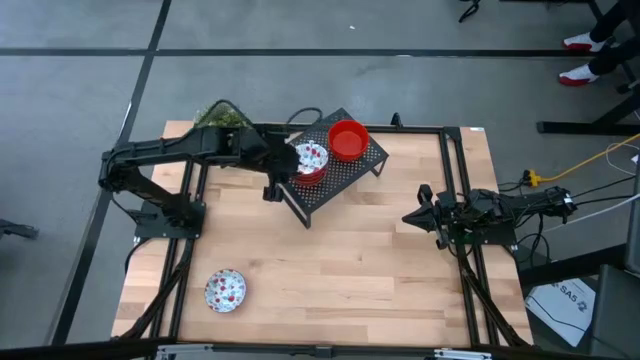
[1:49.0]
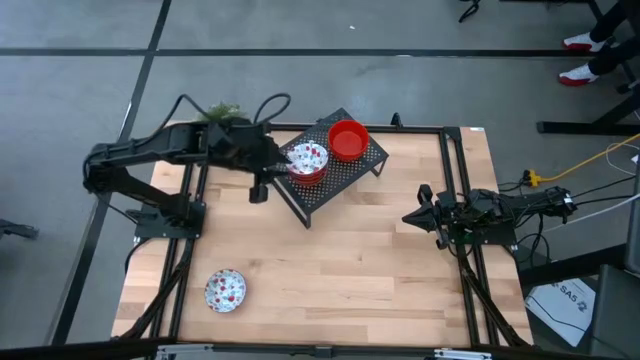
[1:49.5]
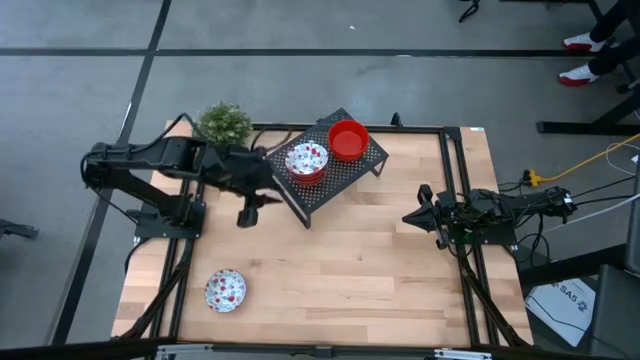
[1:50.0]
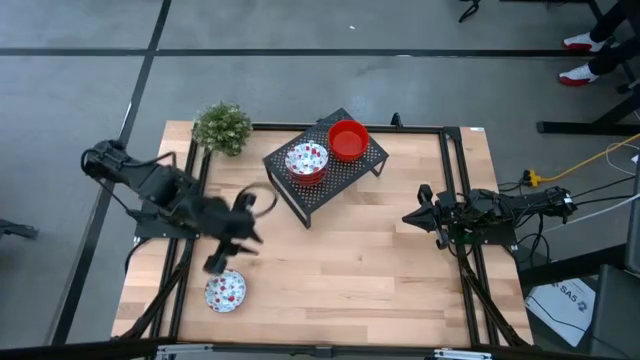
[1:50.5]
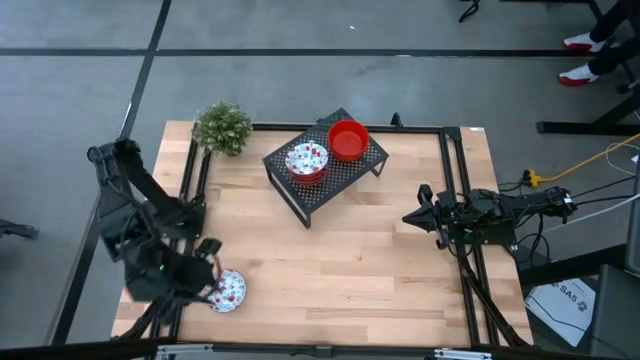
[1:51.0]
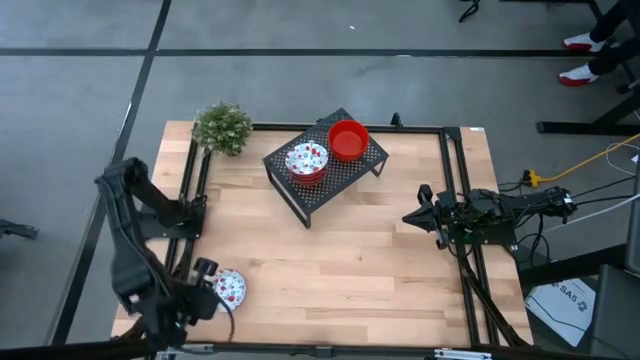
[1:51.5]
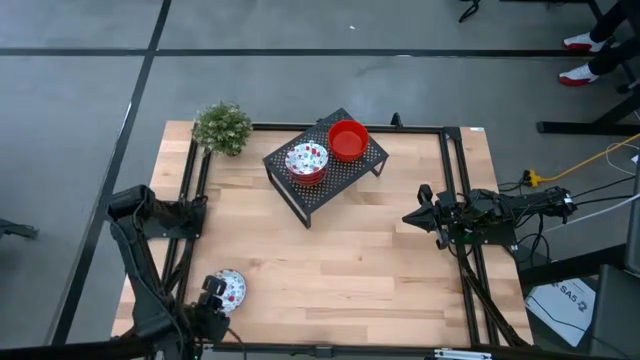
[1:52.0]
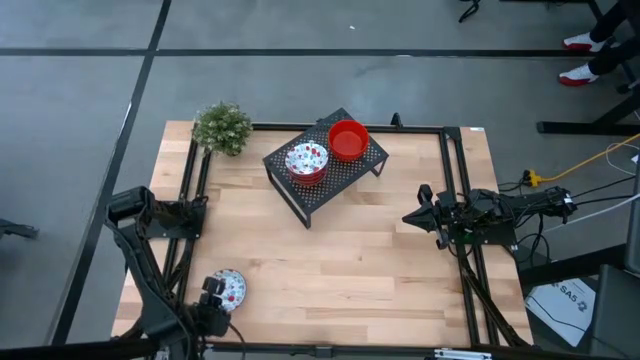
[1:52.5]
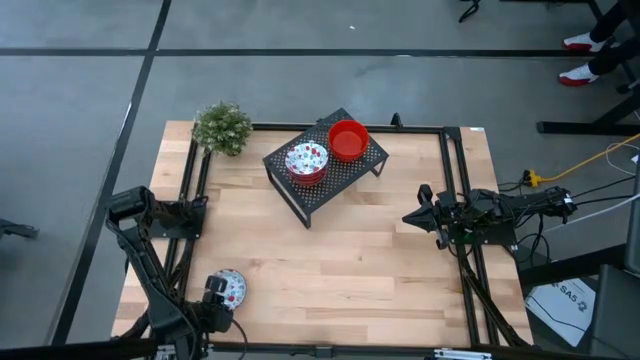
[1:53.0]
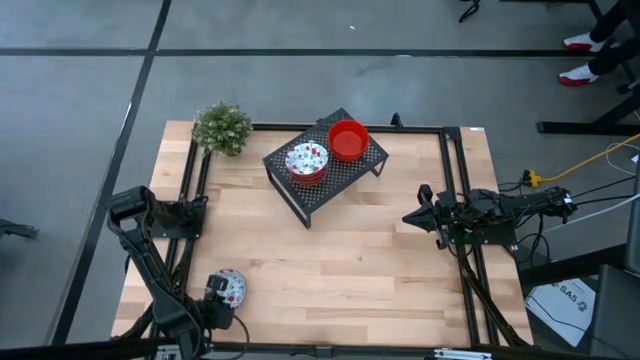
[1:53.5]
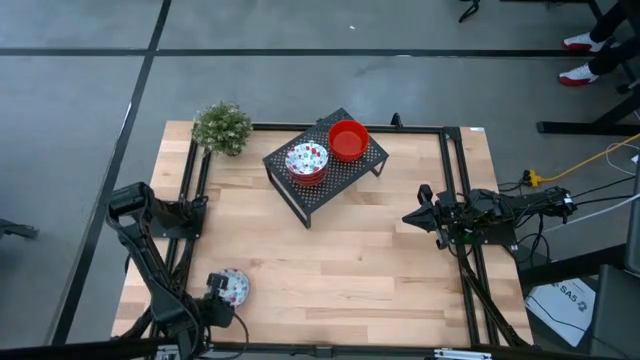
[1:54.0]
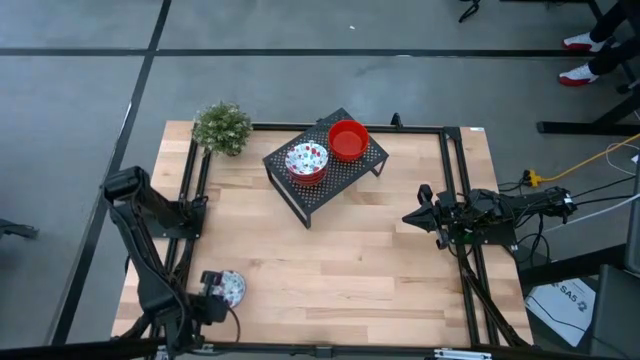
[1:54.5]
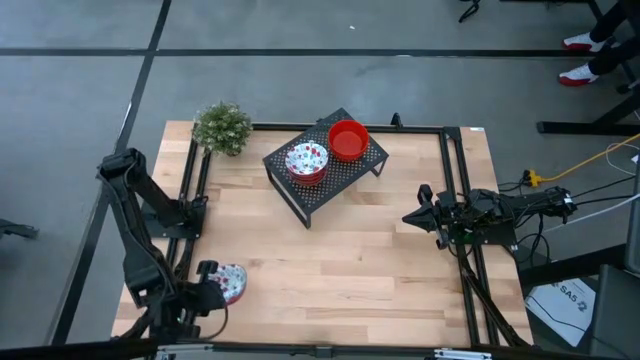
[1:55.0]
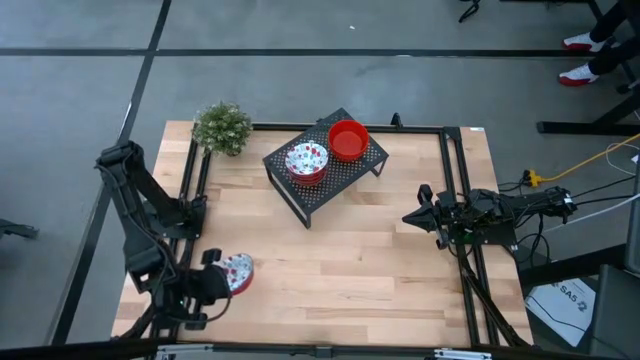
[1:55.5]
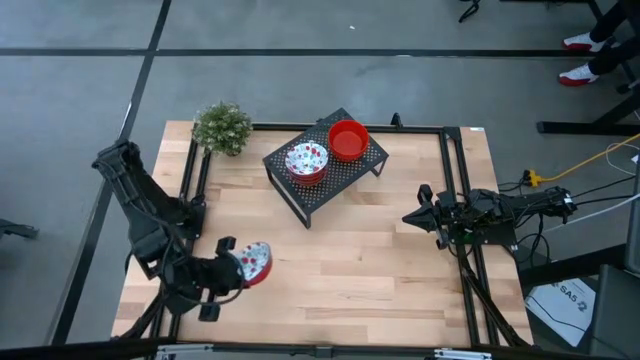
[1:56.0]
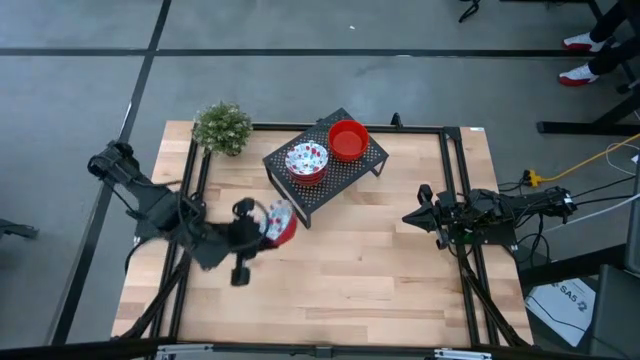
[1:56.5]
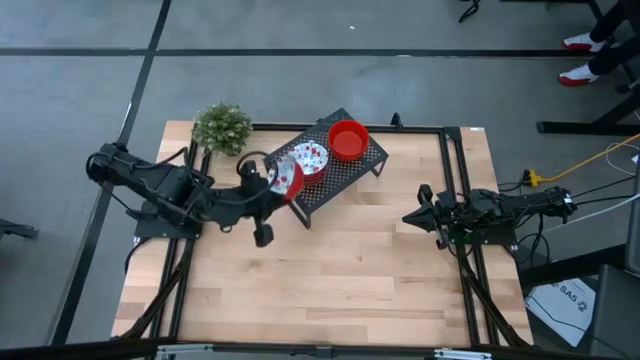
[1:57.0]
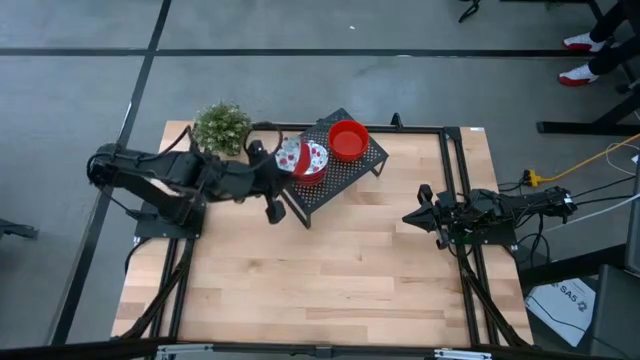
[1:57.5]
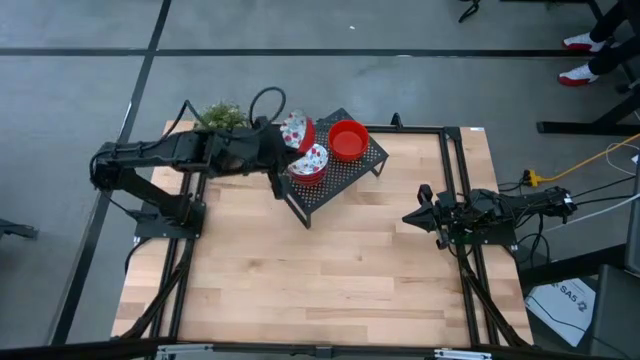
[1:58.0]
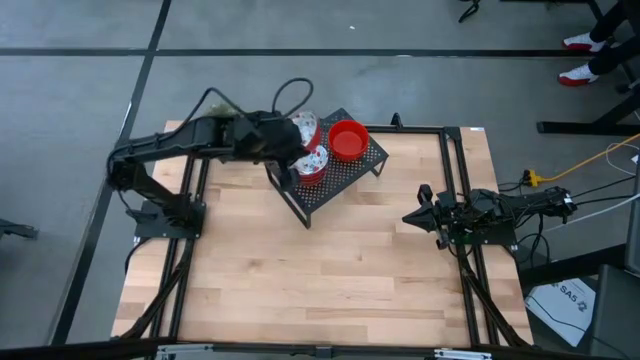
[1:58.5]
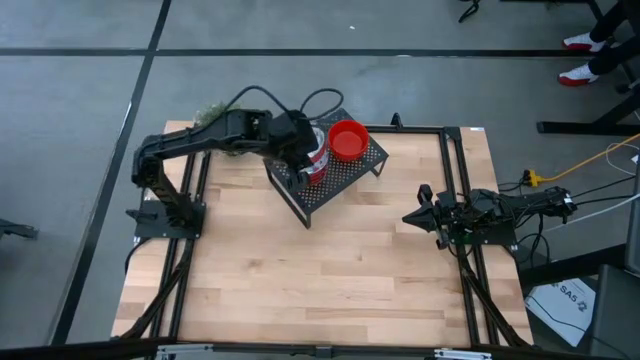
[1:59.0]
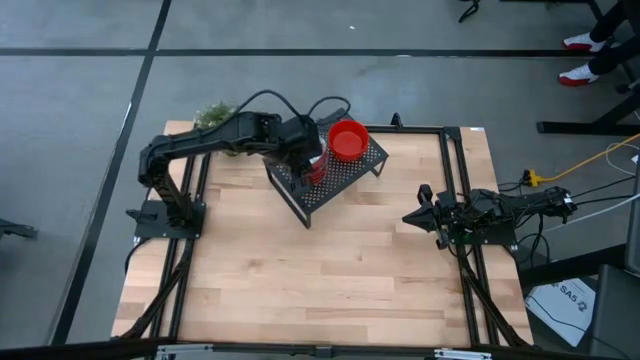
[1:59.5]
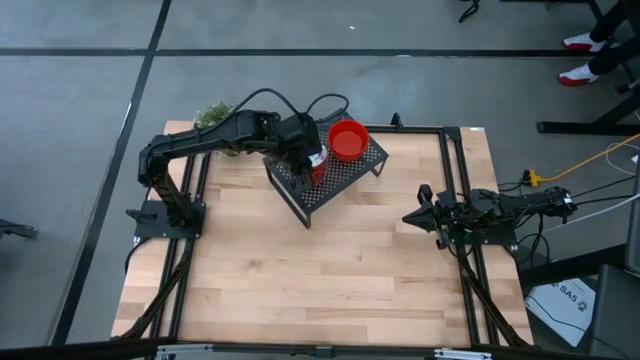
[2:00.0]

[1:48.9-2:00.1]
Task: Pick & Place Mini bowls
Stack the white patterned bowl on the white patterned bowl on the shelf

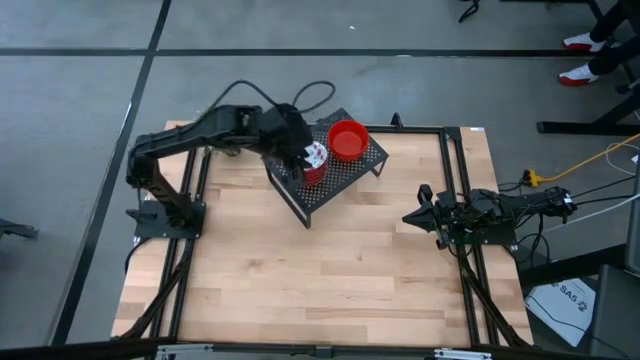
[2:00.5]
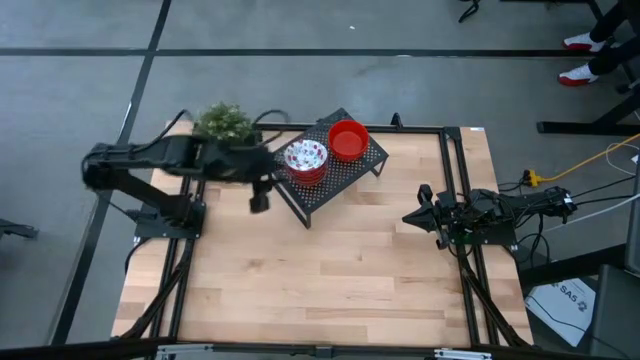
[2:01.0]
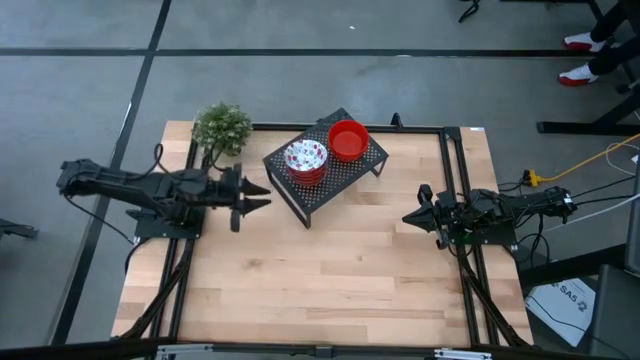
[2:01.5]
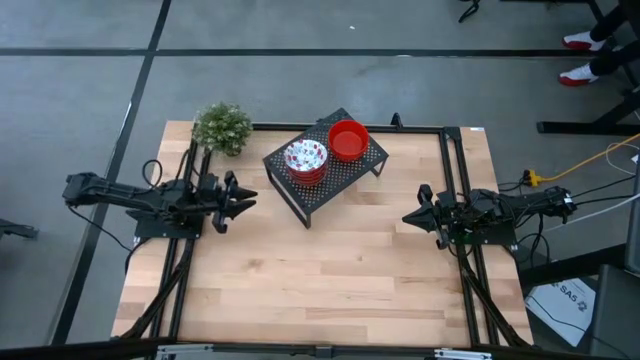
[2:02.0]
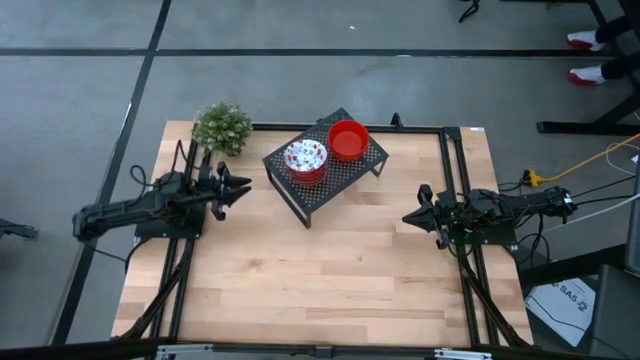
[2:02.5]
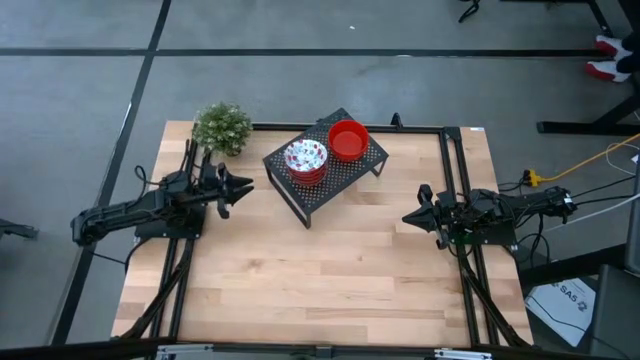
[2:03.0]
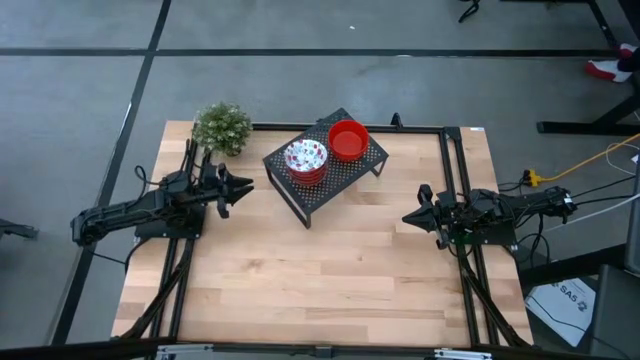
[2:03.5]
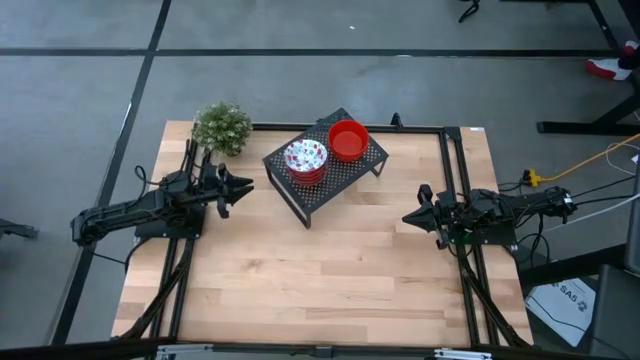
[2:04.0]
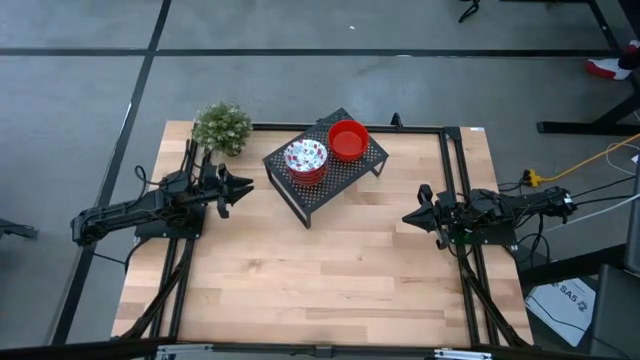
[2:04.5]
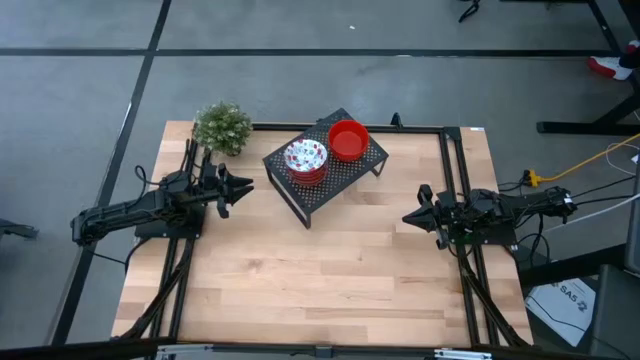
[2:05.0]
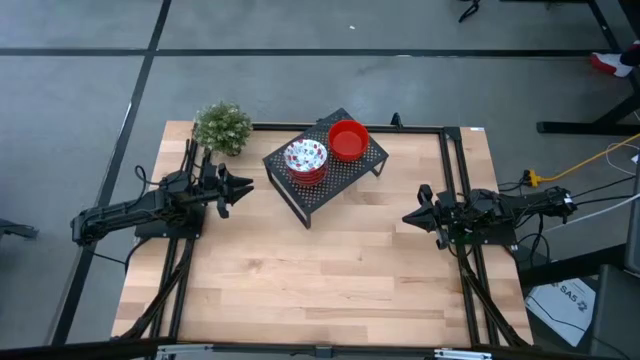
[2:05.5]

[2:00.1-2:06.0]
Return to Home Position

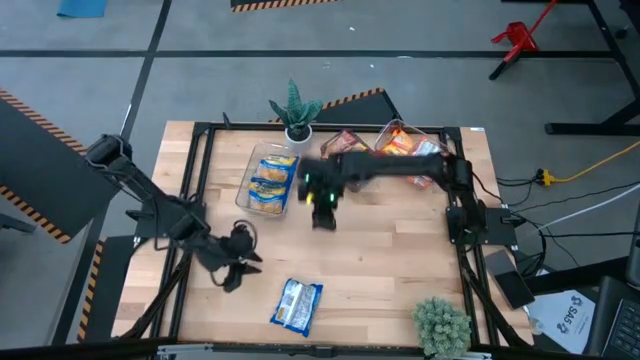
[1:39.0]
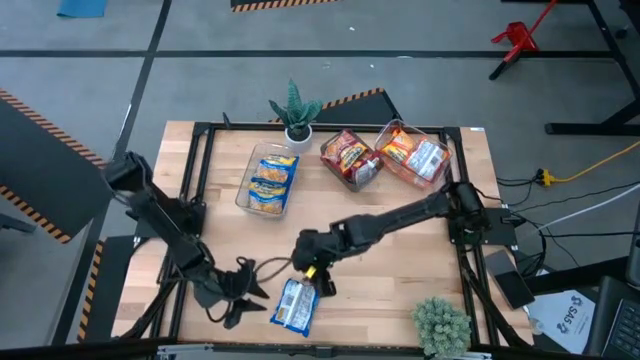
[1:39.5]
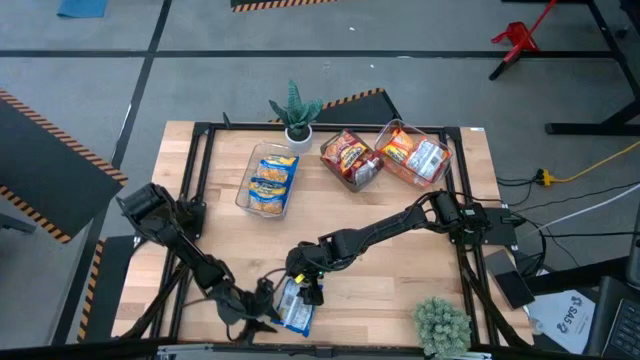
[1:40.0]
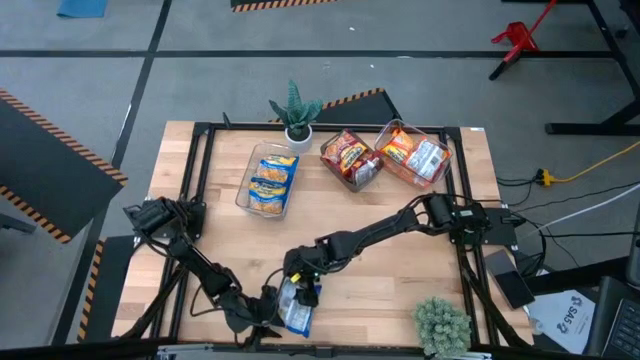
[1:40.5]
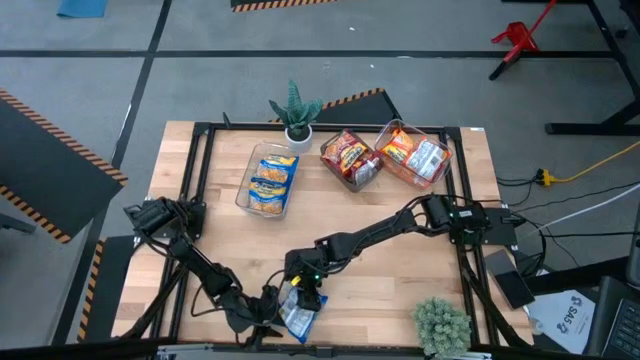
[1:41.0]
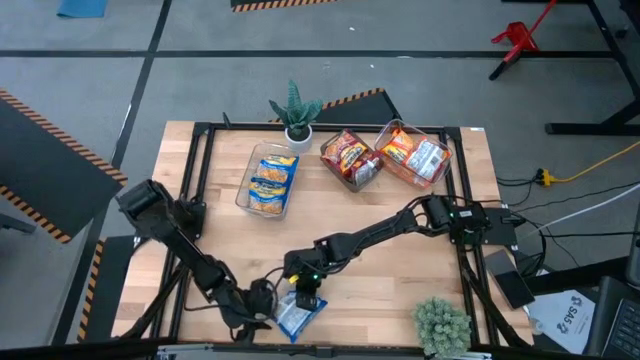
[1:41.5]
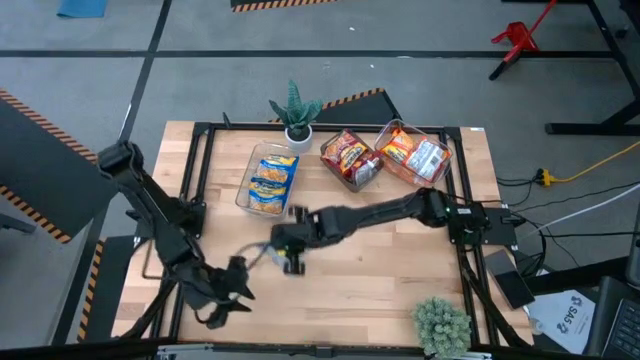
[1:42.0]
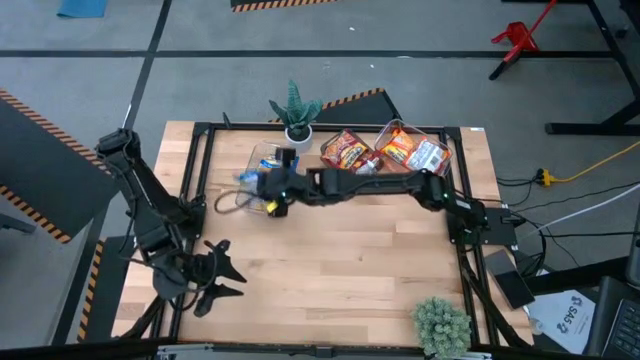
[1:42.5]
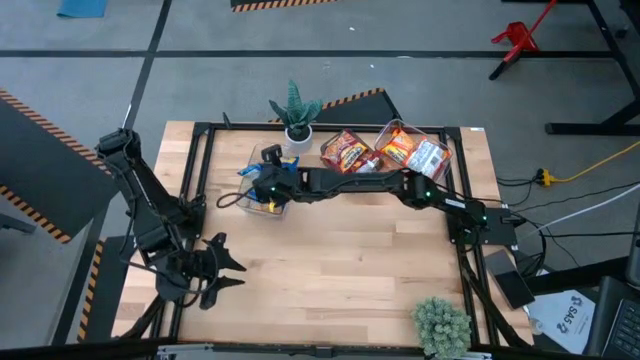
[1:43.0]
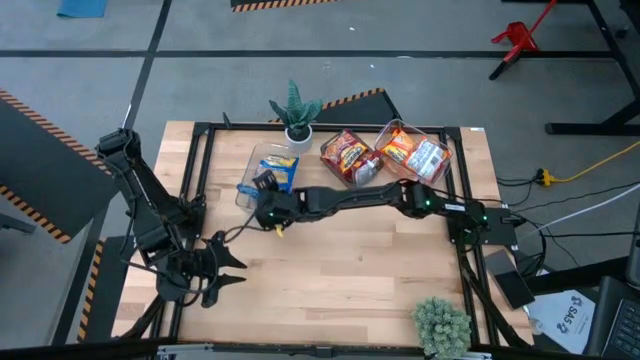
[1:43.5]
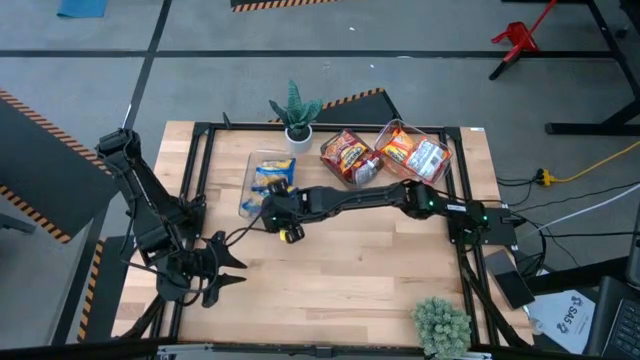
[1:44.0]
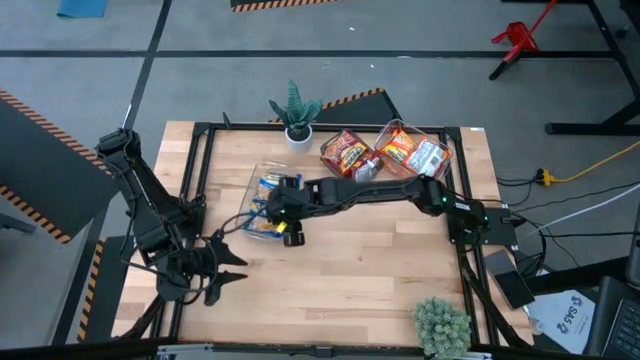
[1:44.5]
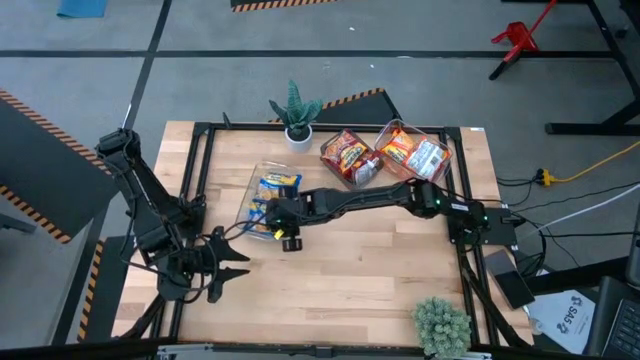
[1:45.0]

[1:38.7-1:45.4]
Task: Sort Maruchan noodles
Put the blue noodle pack into the left transparent bin
